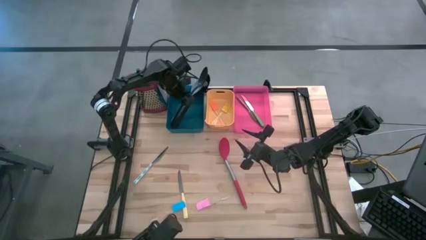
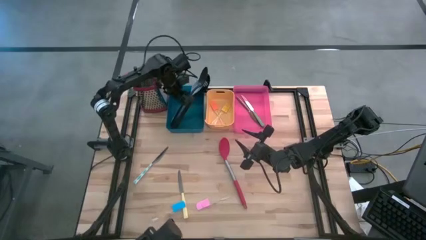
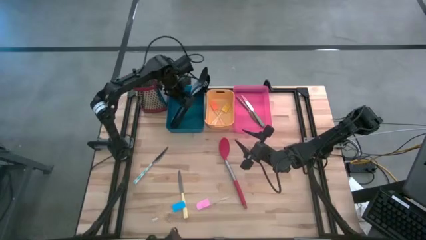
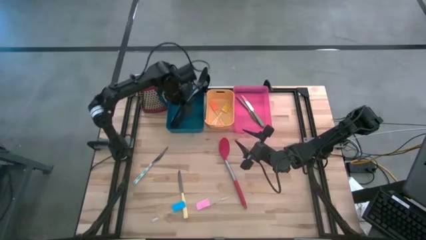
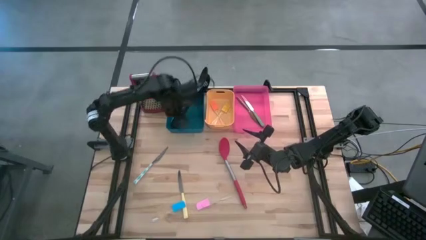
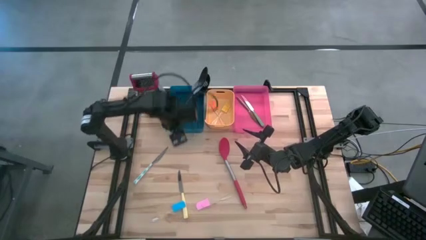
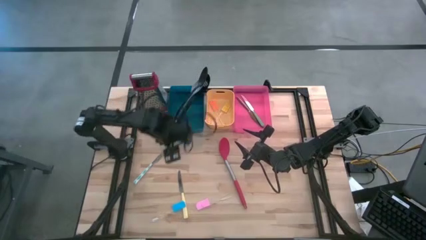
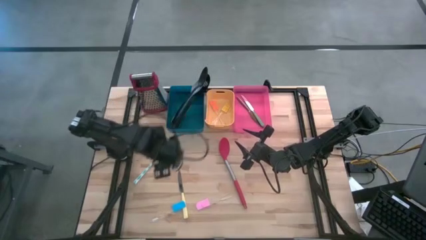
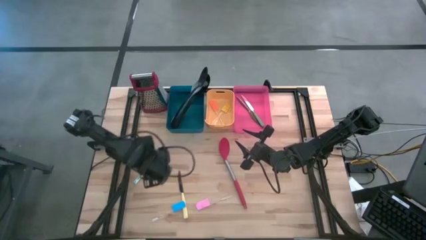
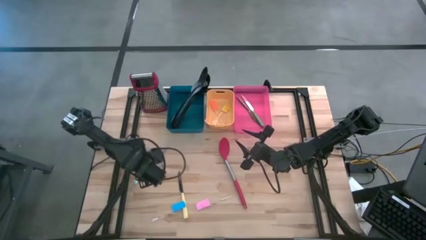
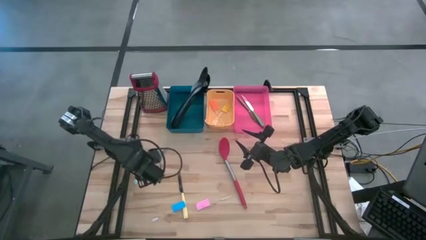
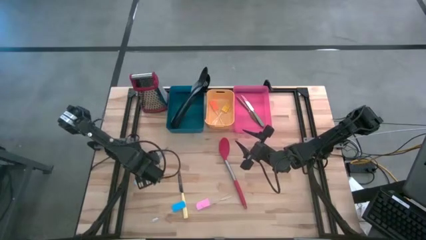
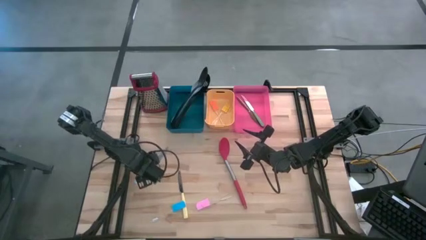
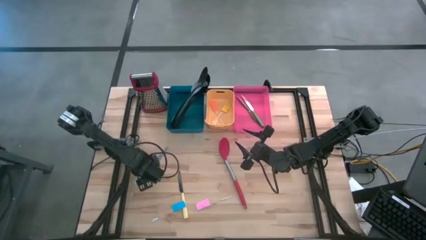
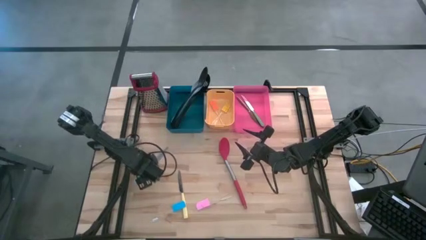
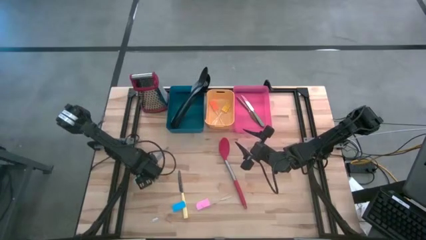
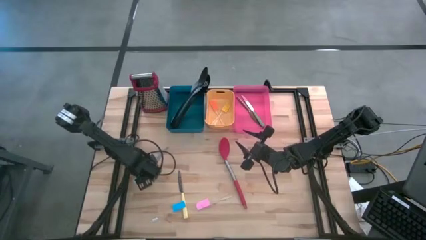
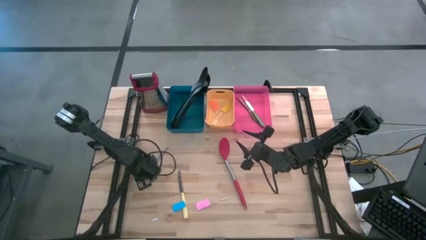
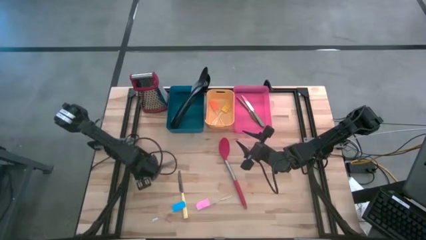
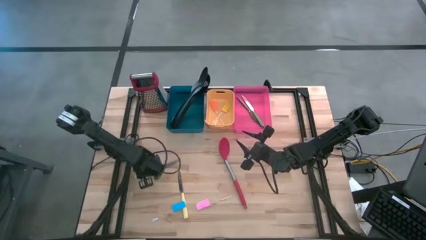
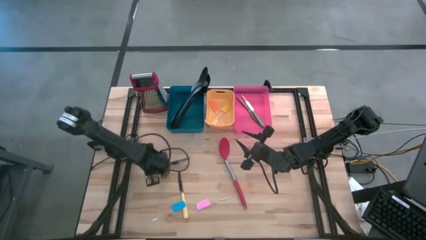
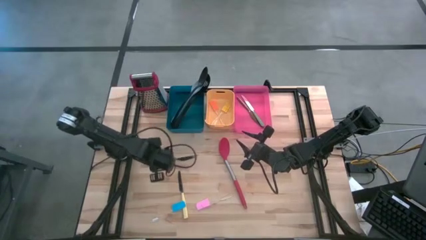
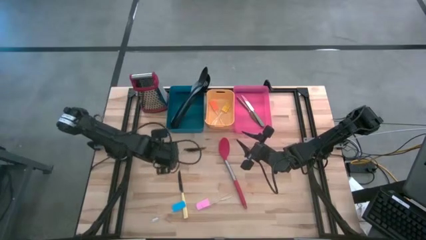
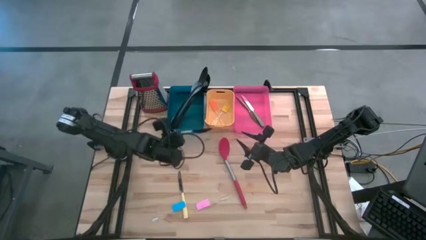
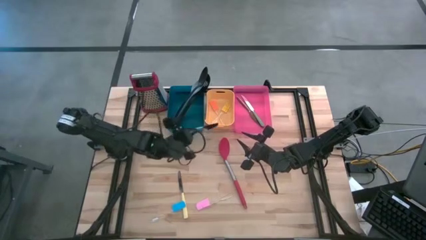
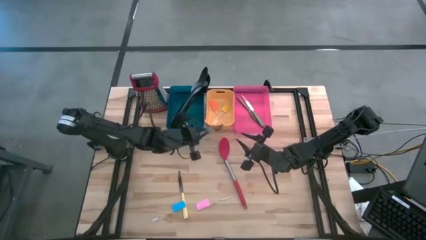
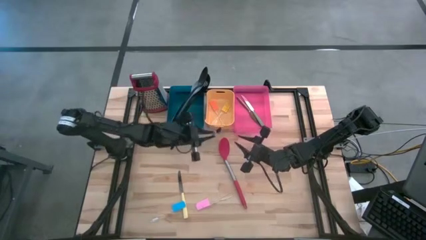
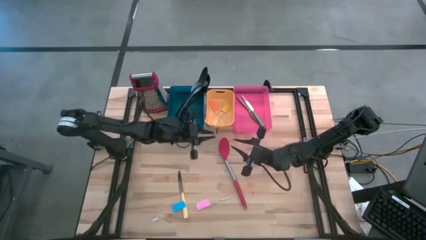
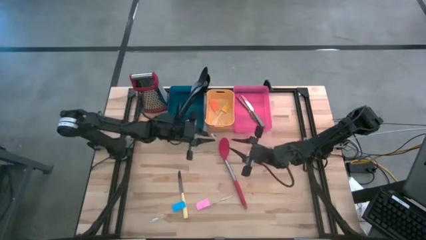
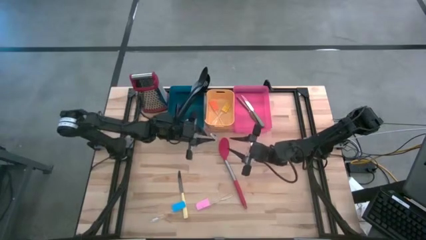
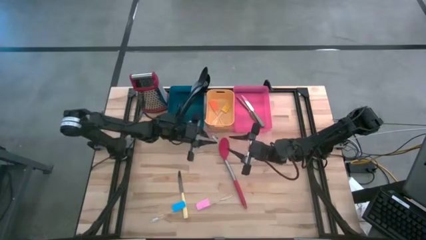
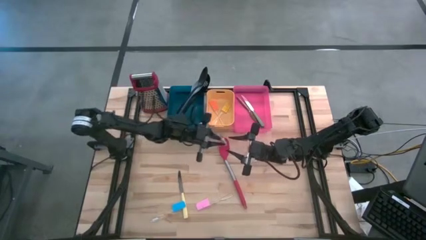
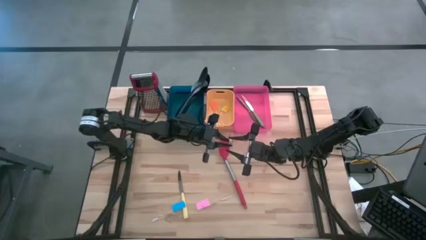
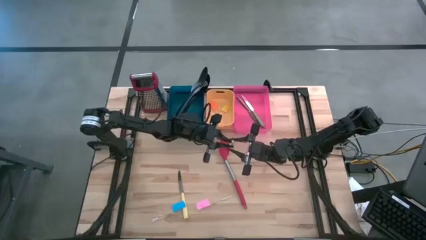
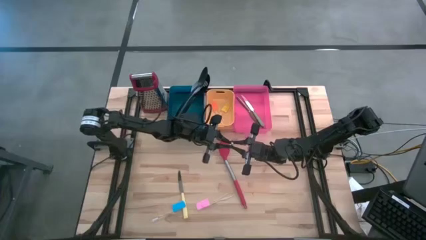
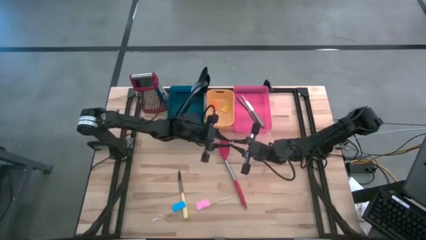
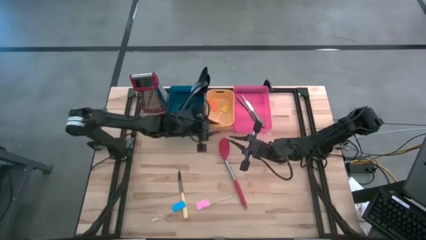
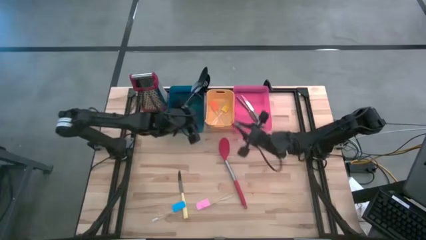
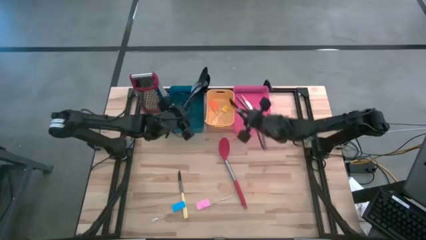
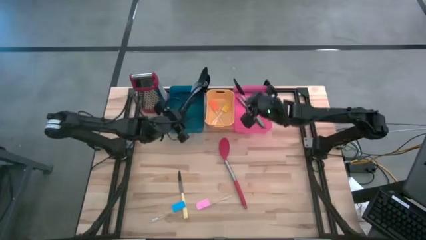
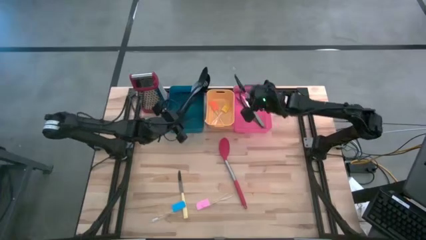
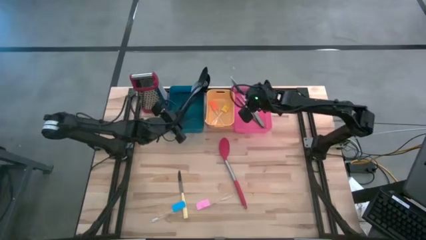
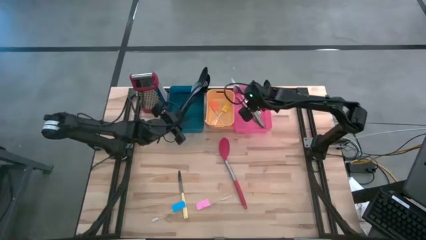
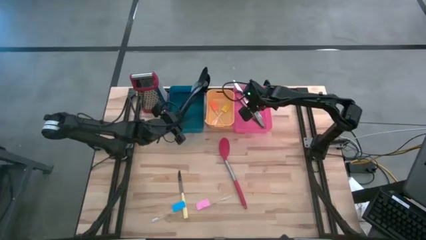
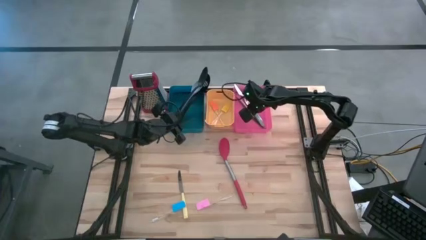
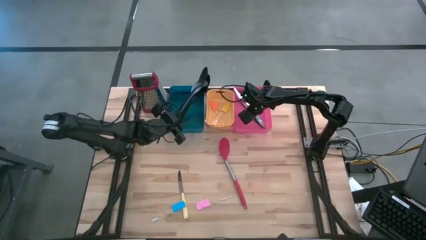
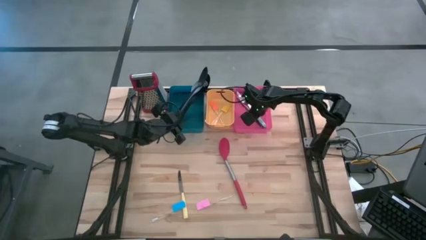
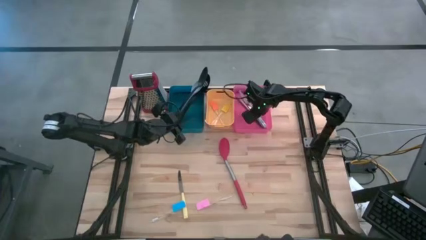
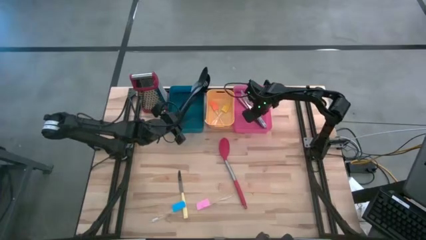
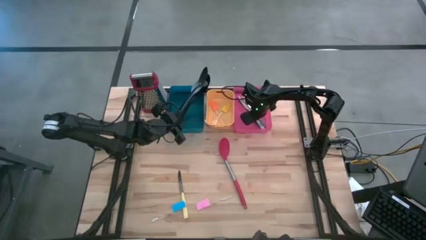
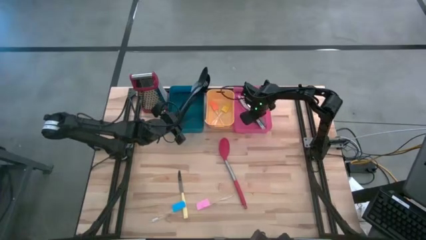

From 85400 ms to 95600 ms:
Task: Pick & Place Kitchen Items
Put the blue knife into the red bin

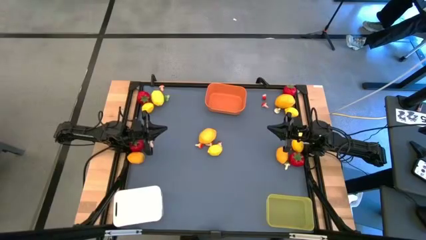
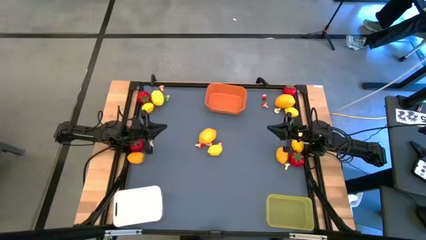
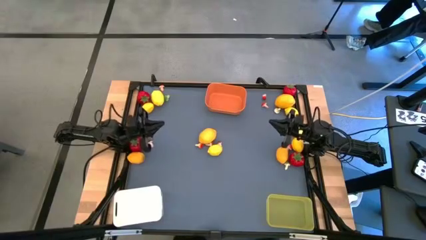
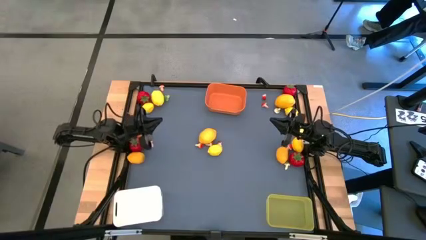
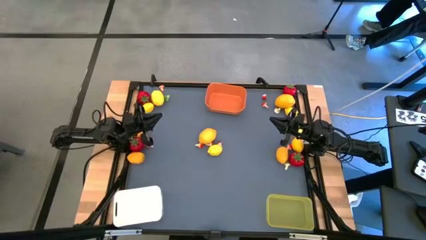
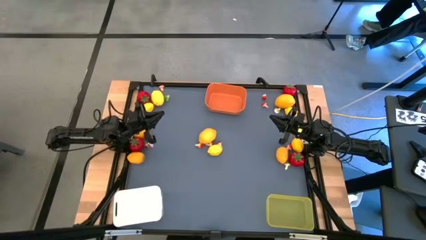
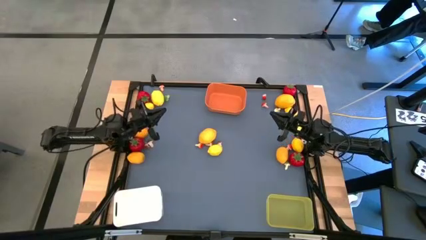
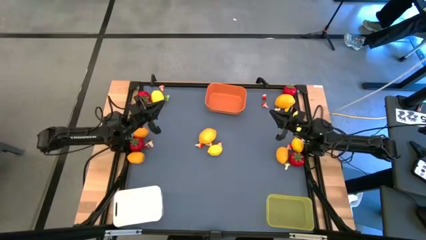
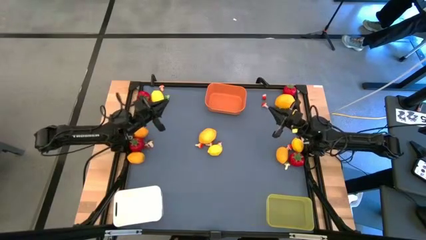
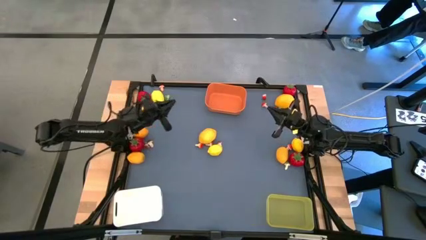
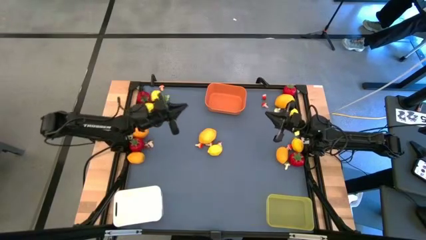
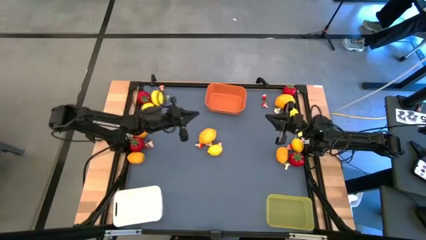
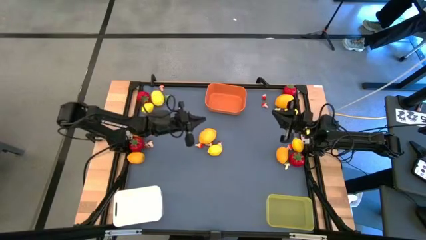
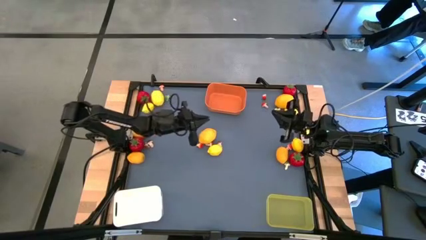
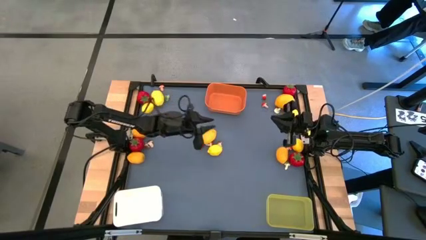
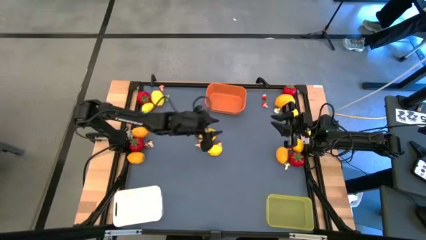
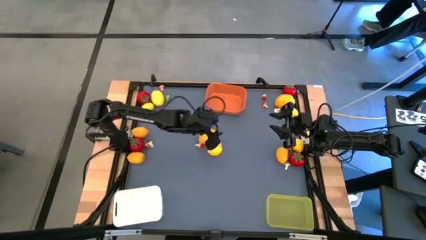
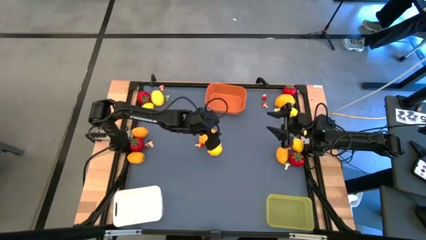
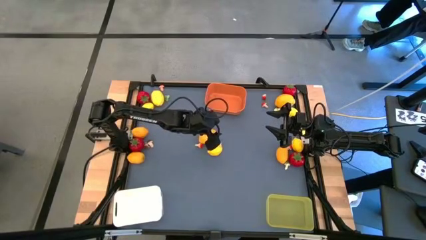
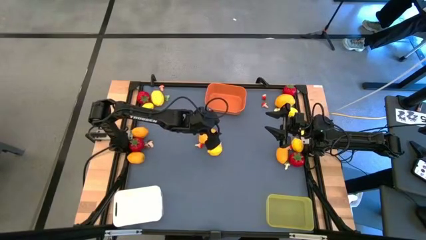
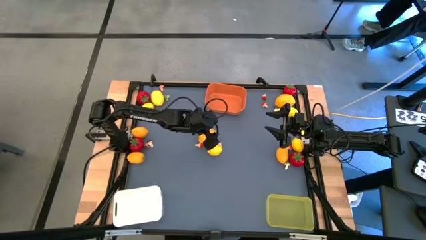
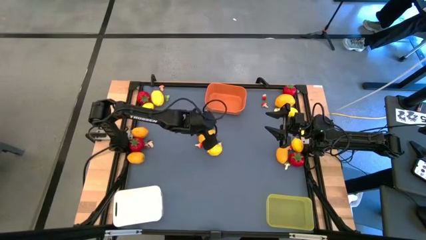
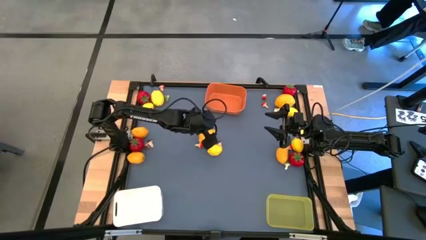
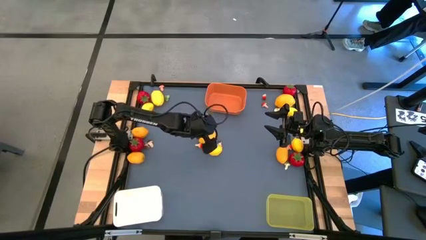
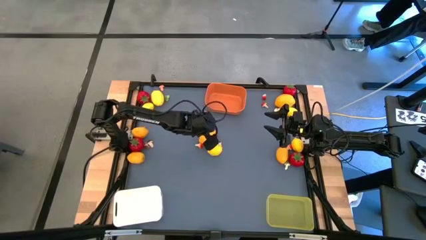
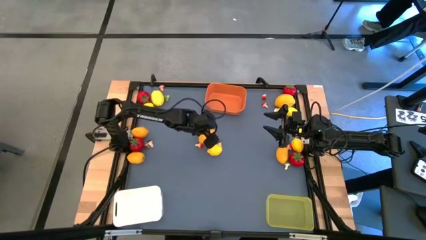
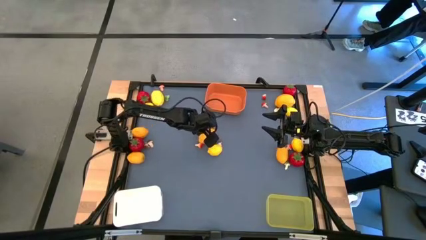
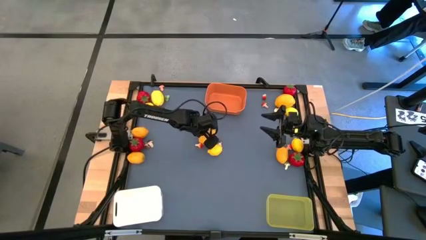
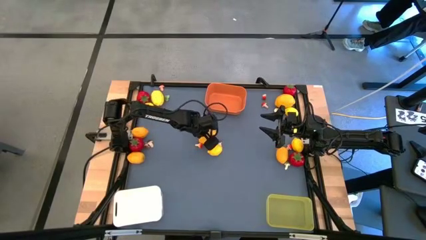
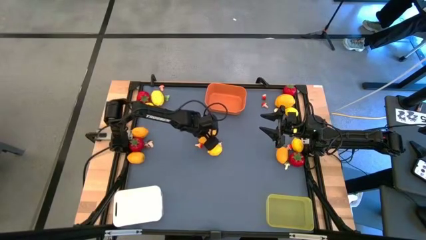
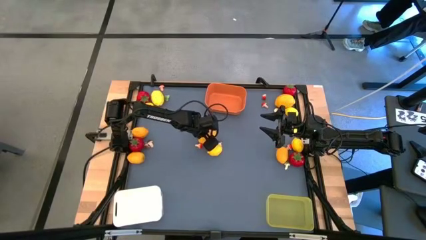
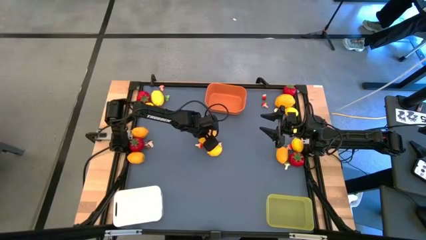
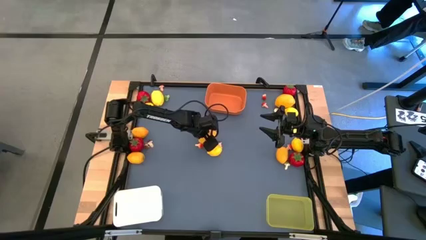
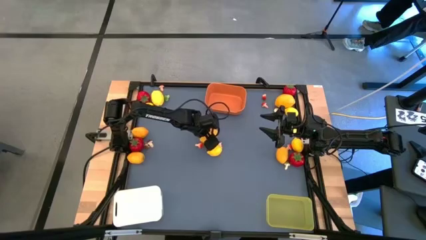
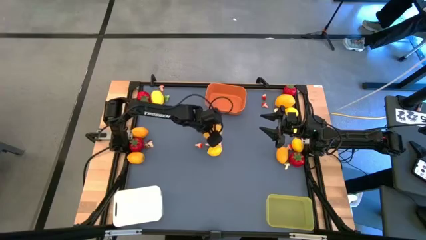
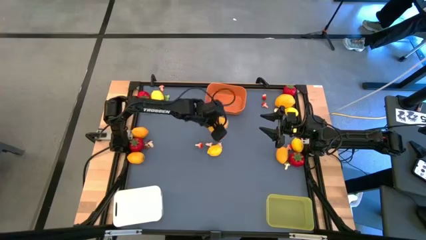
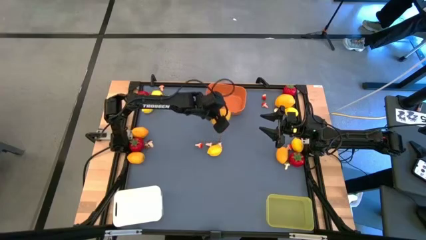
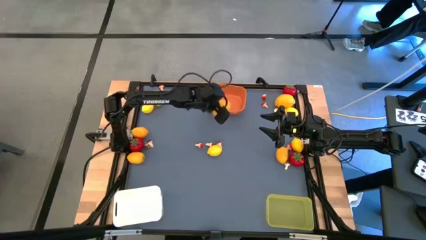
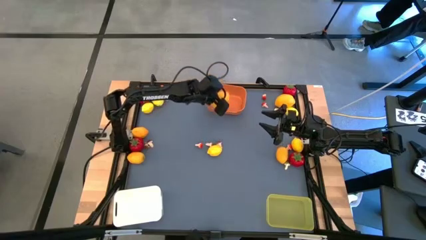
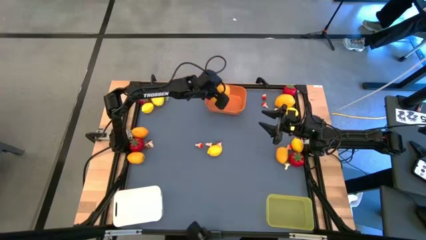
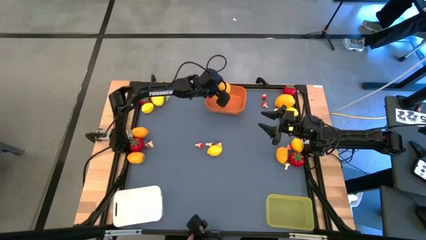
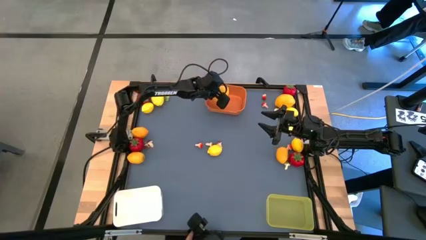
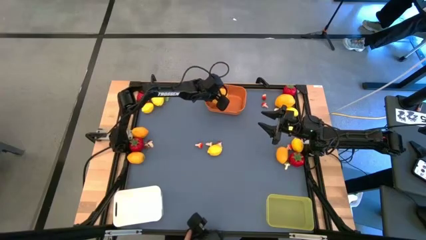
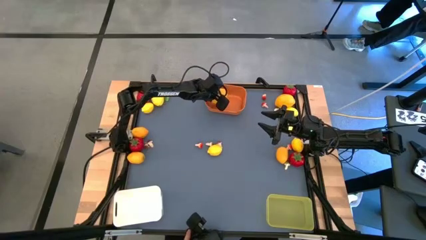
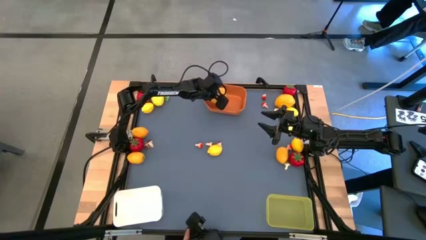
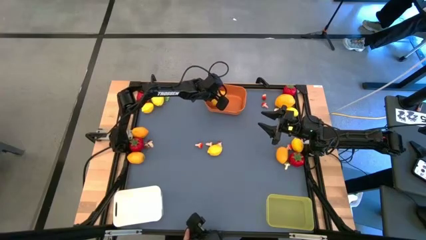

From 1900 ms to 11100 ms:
Task: Sort produce into baskets
Put the yellow lemon into the orange bin
